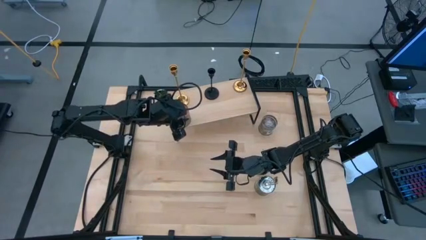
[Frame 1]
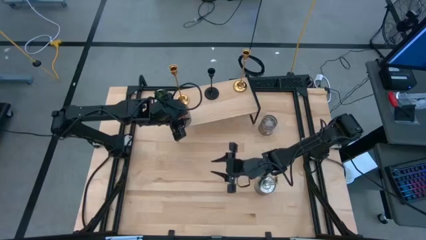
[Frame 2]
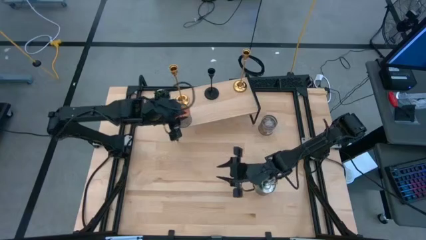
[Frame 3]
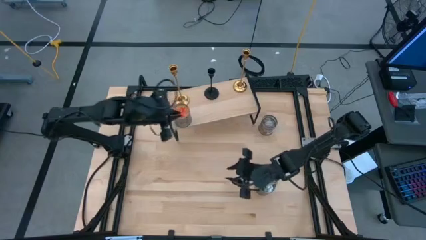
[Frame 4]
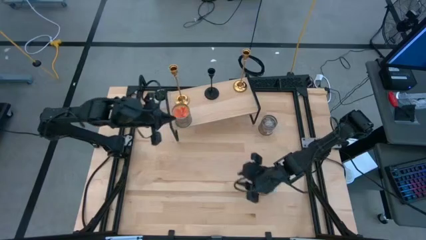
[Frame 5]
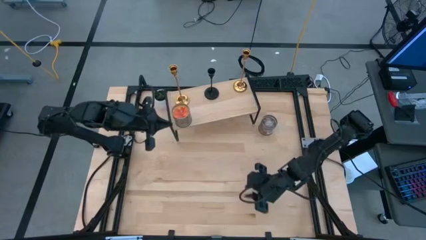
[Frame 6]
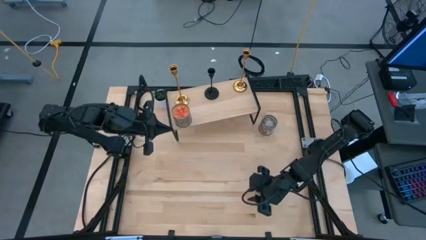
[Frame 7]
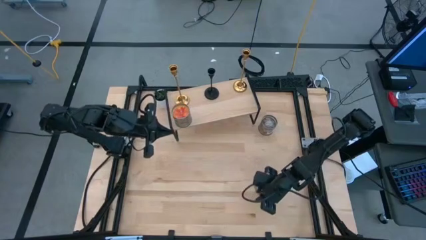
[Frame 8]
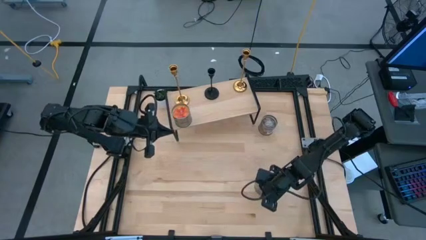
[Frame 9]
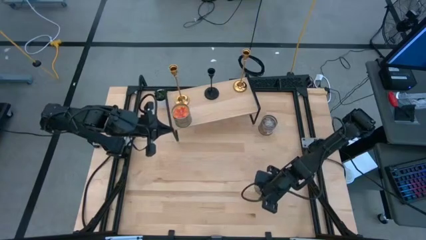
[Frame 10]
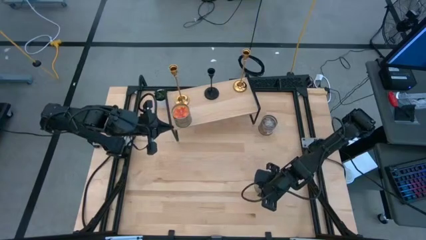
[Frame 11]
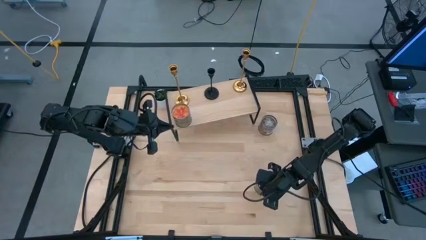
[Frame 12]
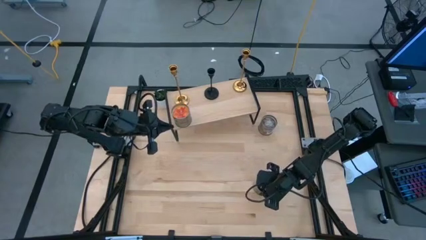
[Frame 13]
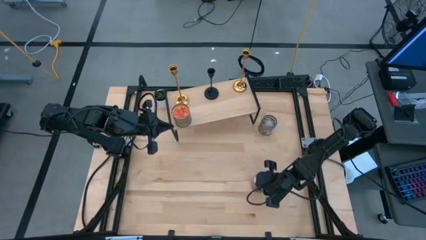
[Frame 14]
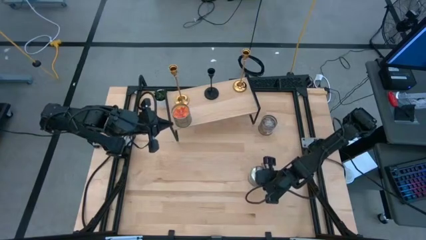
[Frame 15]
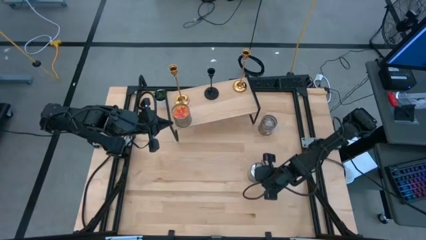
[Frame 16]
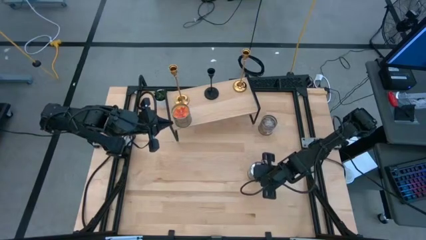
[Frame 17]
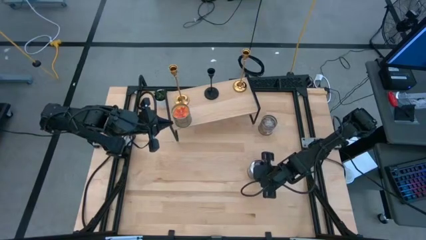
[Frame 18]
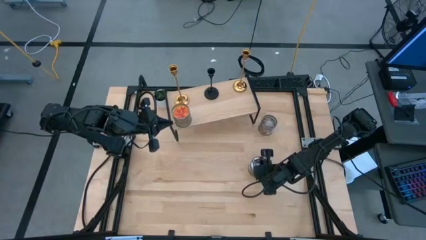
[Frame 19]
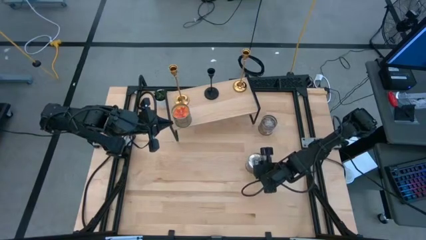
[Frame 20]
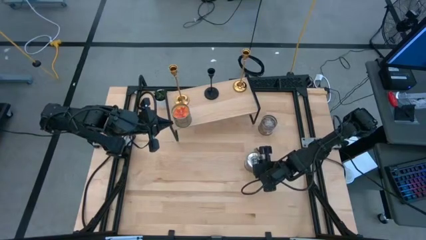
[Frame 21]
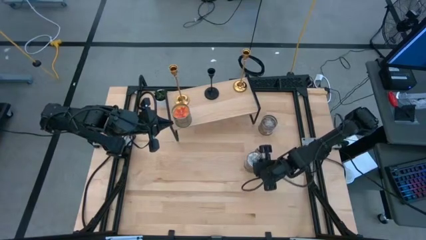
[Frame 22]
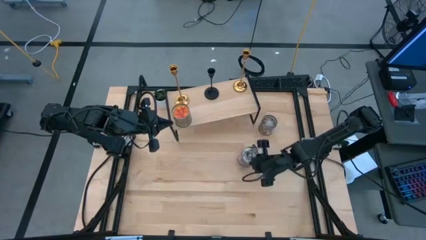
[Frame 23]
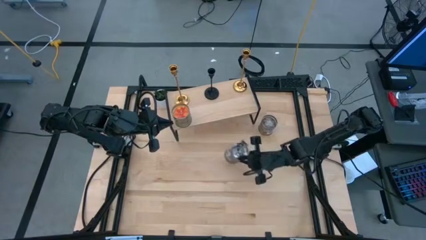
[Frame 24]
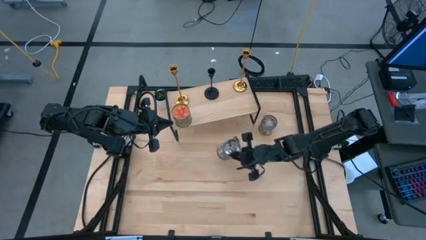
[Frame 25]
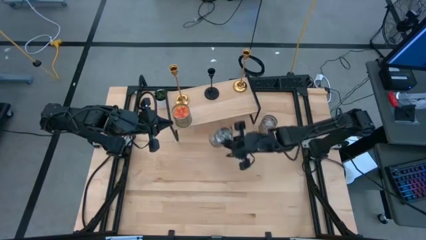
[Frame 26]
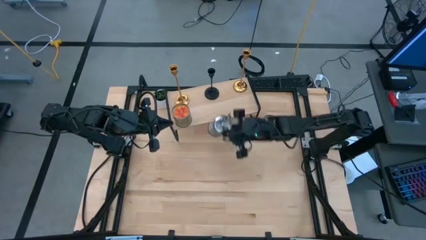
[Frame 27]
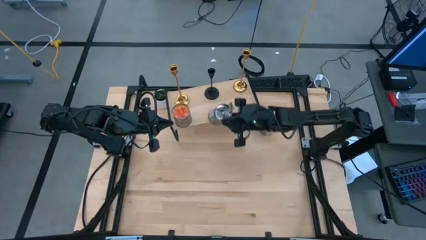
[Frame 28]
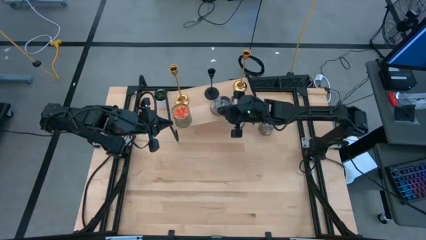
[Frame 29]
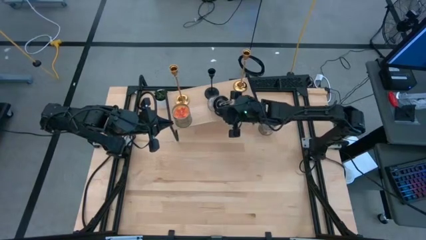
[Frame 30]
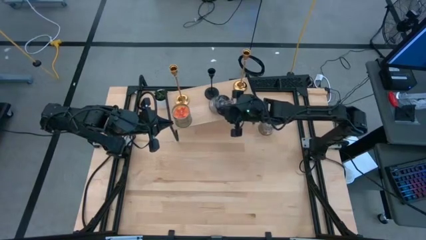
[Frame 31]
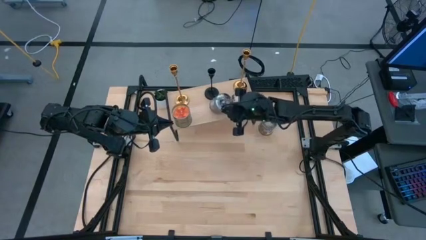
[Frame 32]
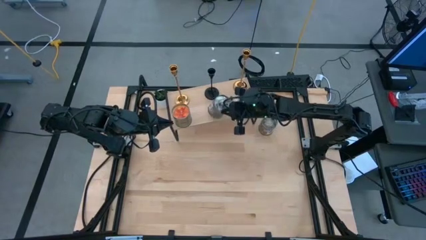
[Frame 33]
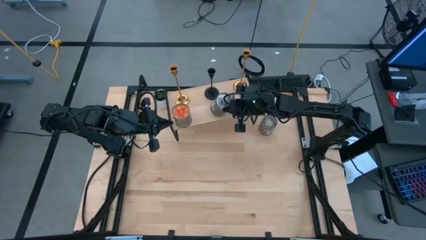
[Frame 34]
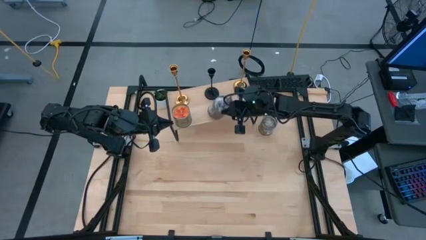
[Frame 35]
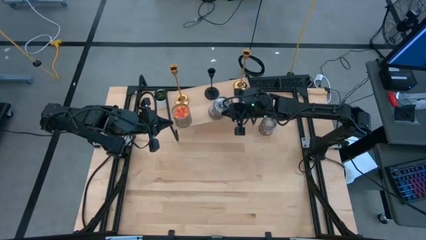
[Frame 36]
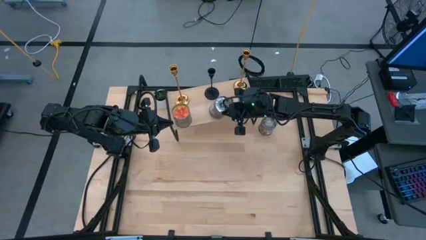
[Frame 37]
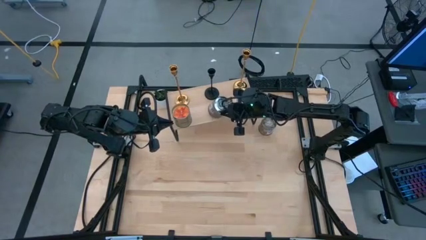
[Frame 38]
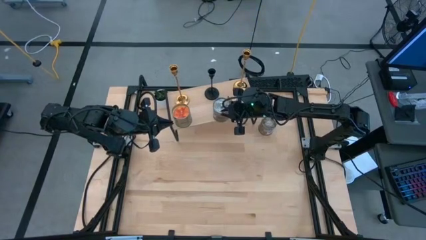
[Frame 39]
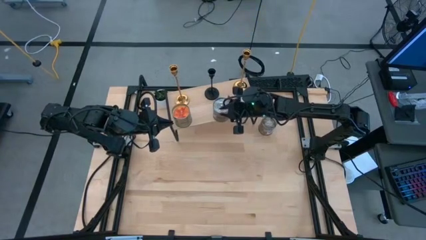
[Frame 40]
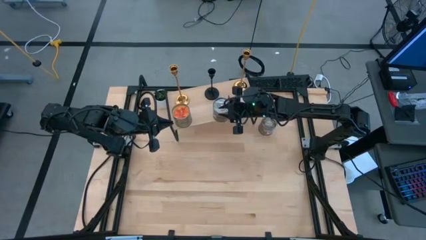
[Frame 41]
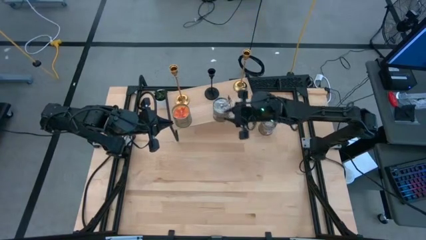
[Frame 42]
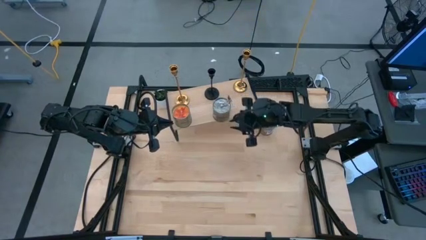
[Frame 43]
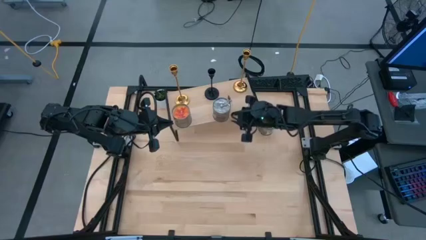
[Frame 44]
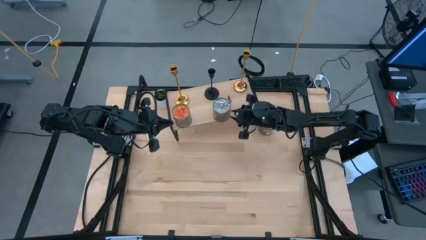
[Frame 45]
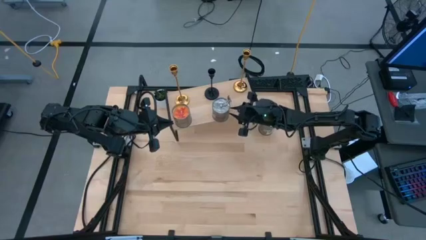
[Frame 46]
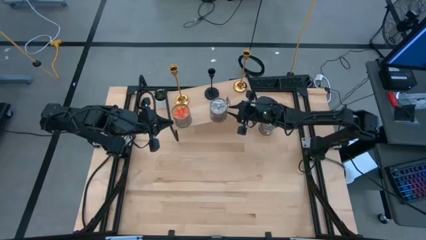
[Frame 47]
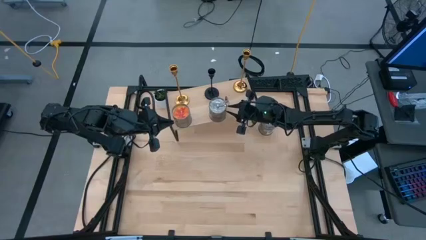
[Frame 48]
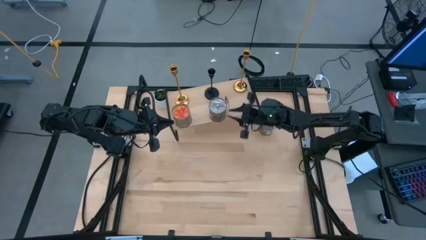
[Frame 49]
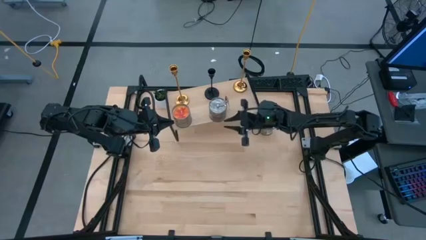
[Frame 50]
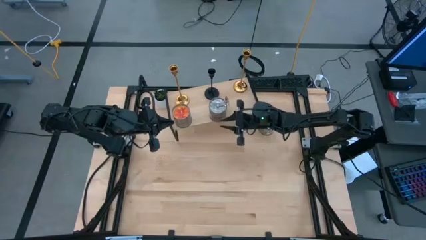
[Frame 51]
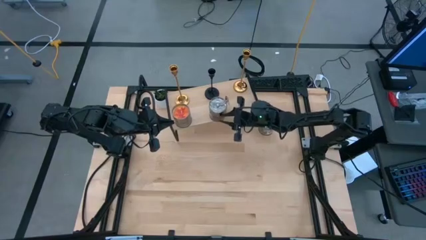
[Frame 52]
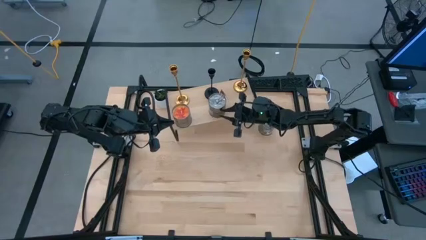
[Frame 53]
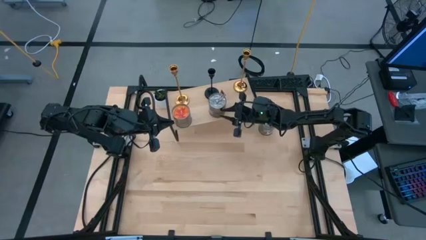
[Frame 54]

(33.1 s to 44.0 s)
Task: Pick & Place candle stick holders
Put the bottom silver scented candle on the shelf

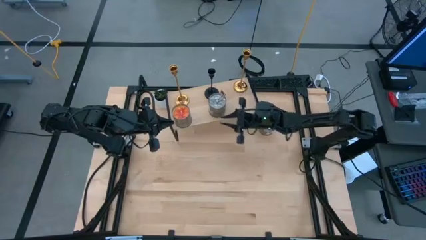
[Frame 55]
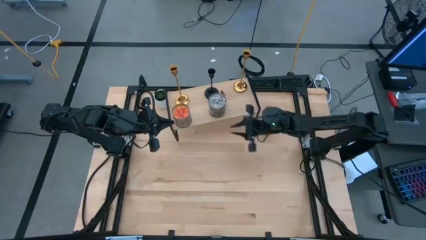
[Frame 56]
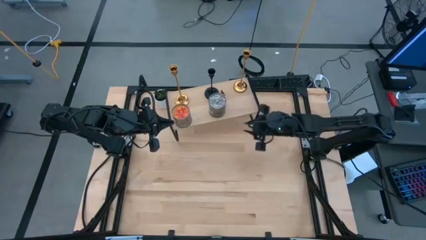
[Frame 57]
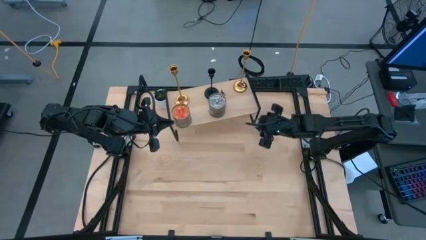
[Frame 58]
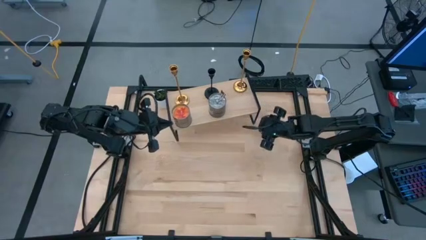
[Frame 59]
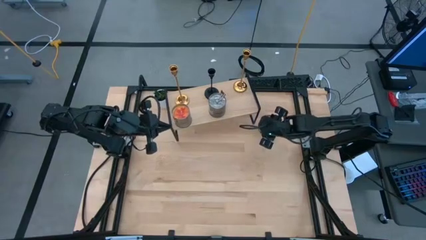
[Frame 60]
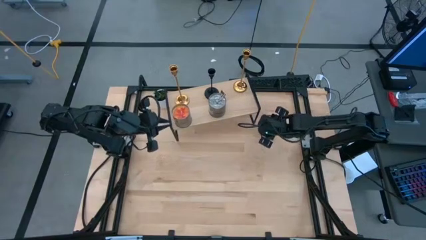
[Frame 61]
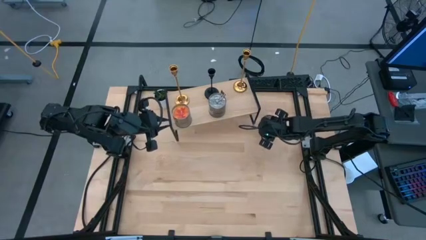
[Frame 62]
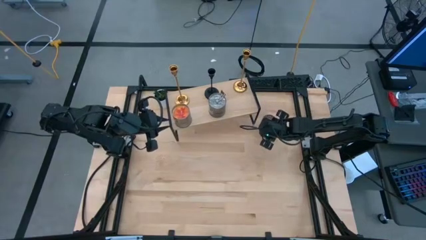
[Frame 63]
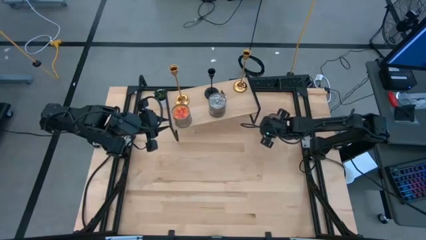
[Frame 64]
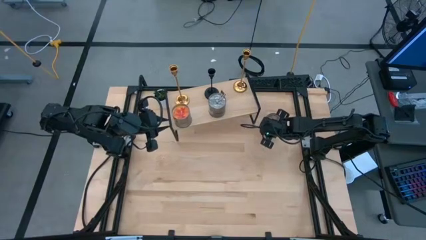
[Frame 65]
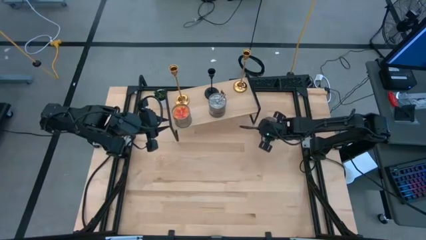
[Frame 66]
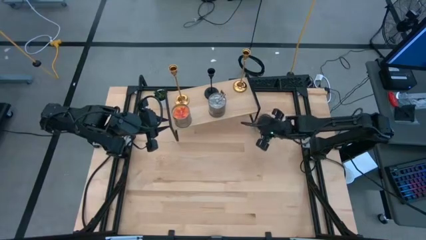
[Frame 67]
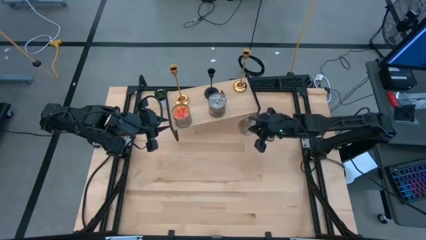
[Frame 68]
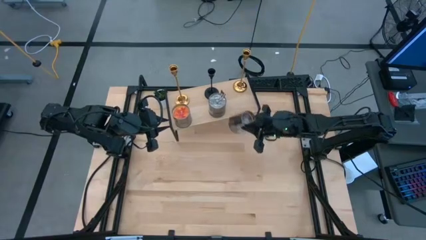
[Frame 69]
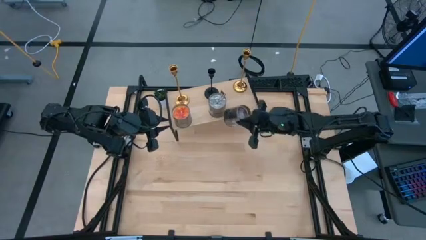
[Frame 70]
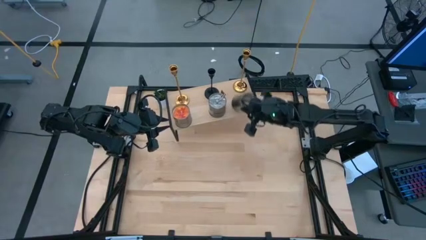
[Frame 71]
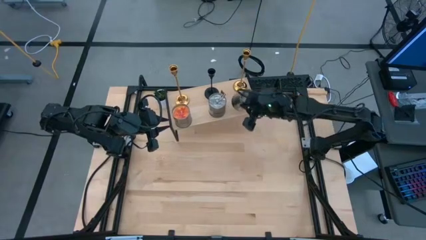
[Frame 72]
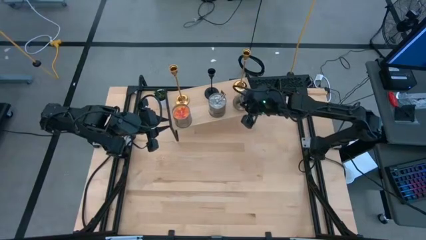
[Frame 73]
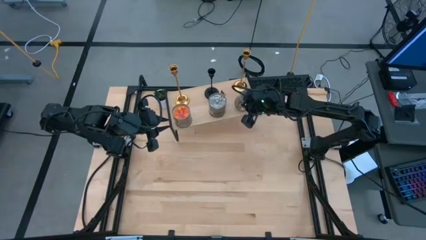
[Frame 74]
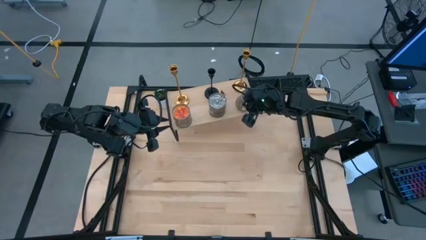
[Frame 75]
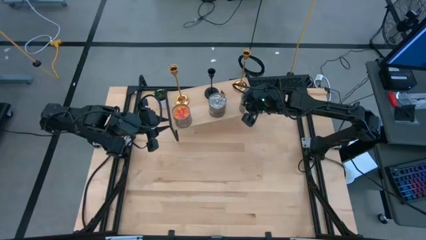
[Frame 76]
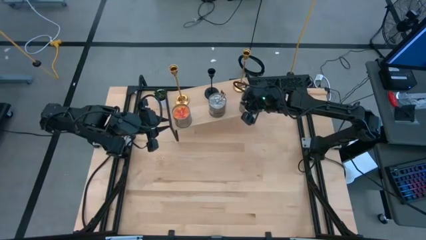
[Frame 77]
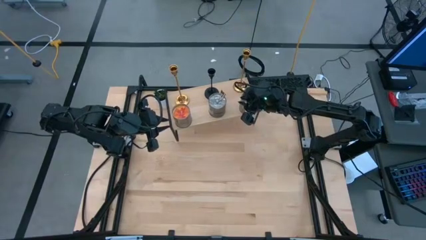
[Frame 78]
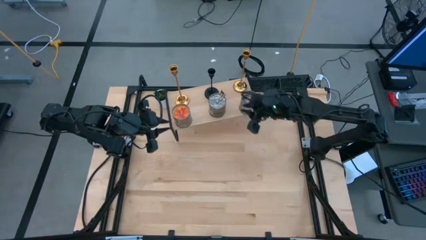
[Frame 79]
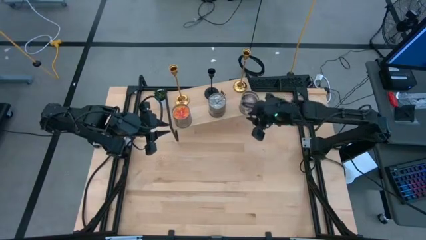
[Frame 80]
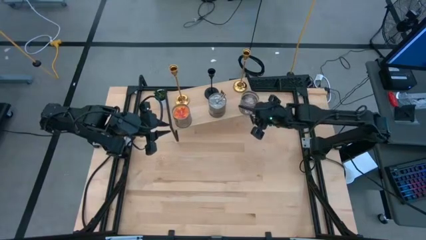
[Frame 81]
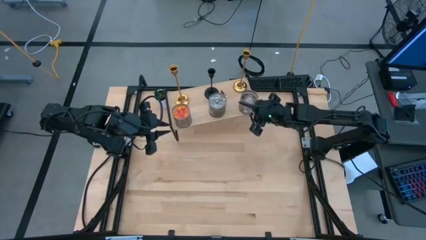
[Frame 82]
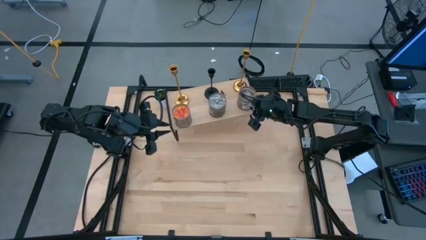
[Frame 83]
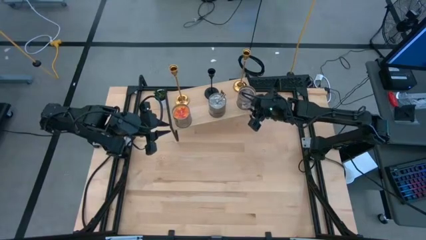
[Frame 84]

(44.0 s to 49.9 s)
Put the silver scented candle on the shelf
